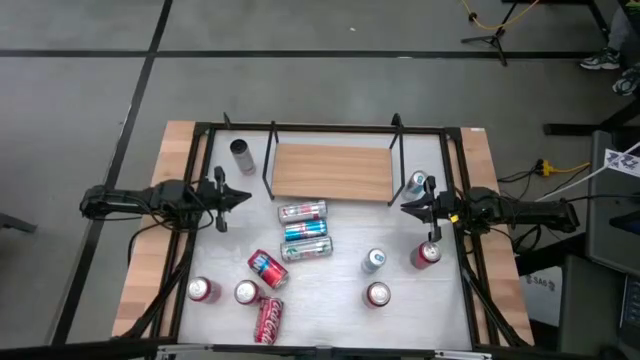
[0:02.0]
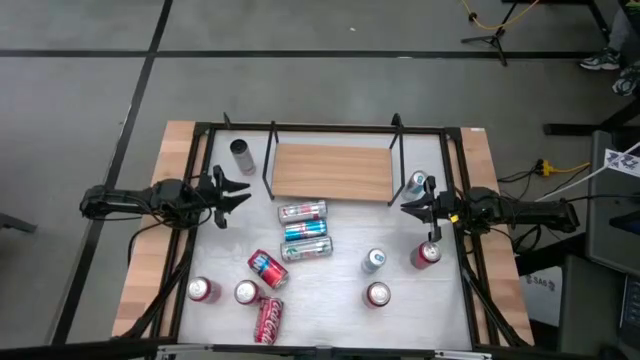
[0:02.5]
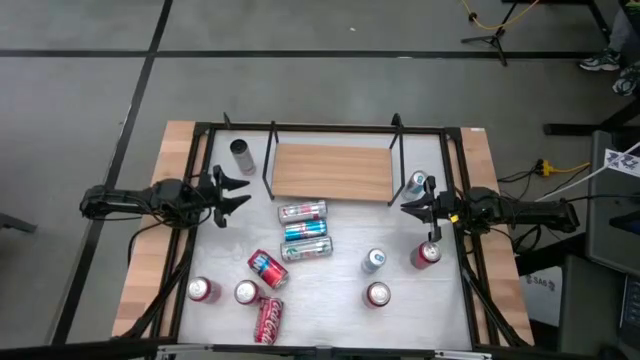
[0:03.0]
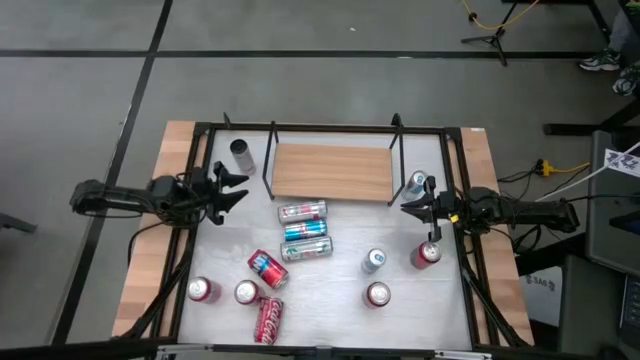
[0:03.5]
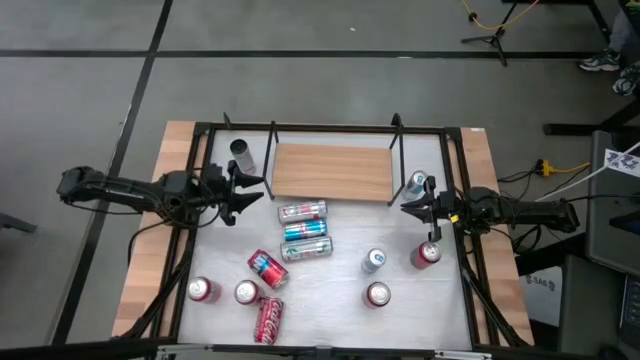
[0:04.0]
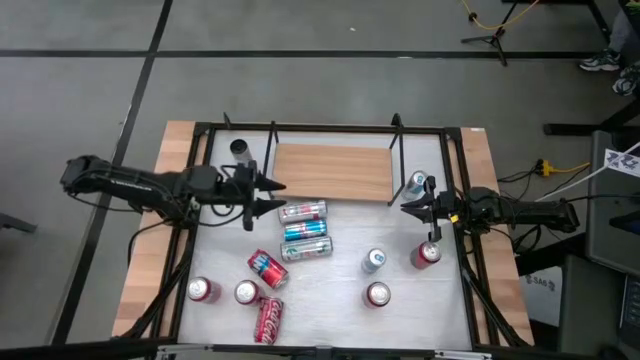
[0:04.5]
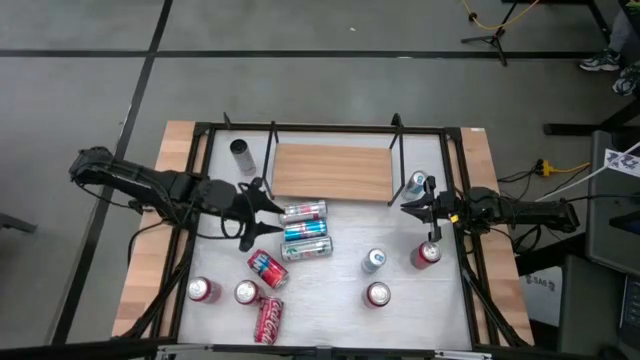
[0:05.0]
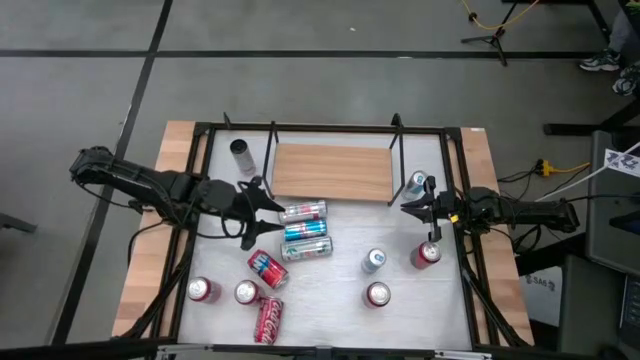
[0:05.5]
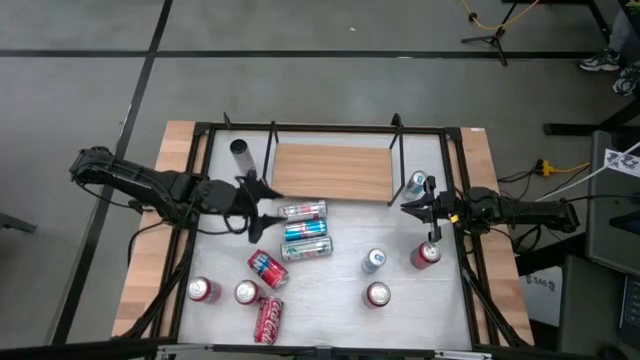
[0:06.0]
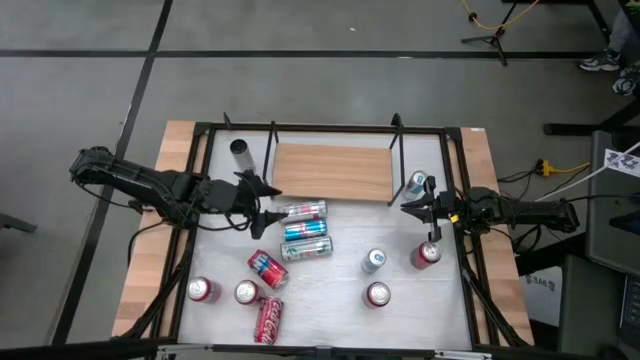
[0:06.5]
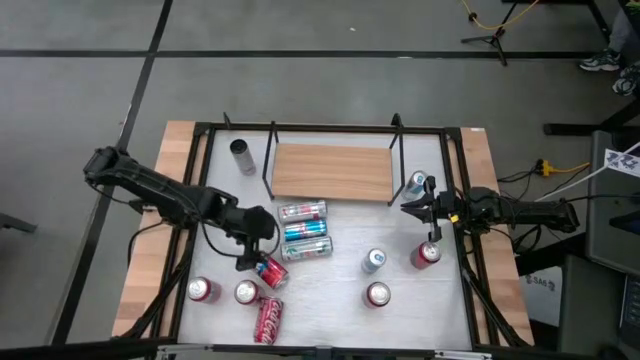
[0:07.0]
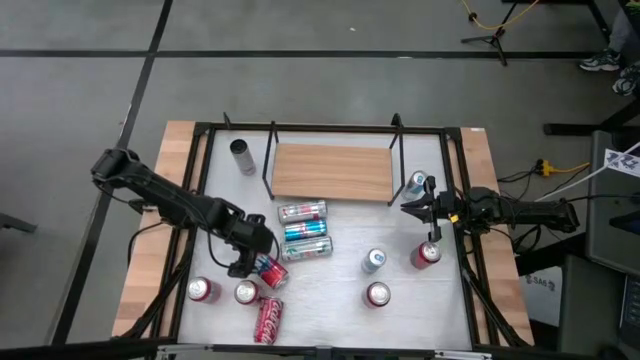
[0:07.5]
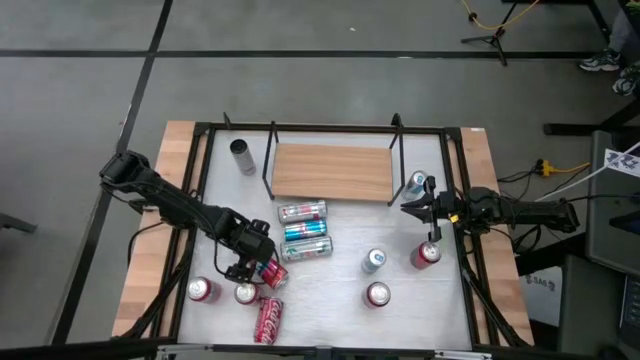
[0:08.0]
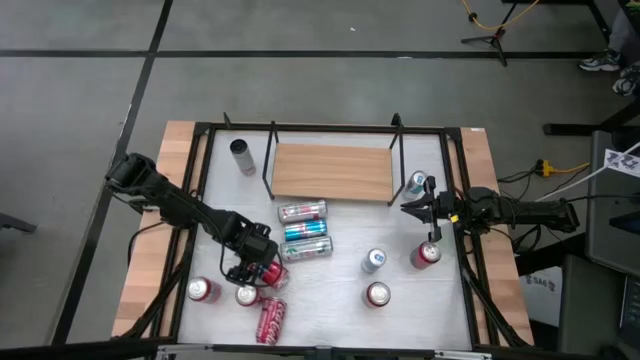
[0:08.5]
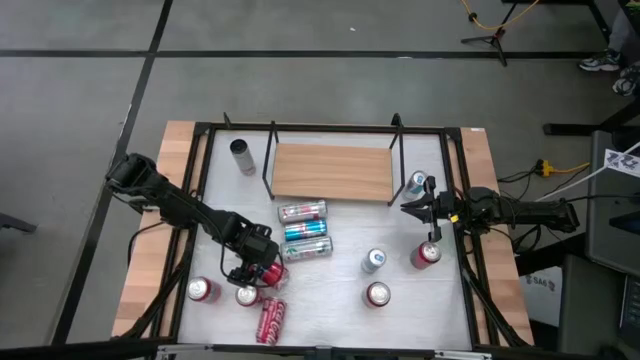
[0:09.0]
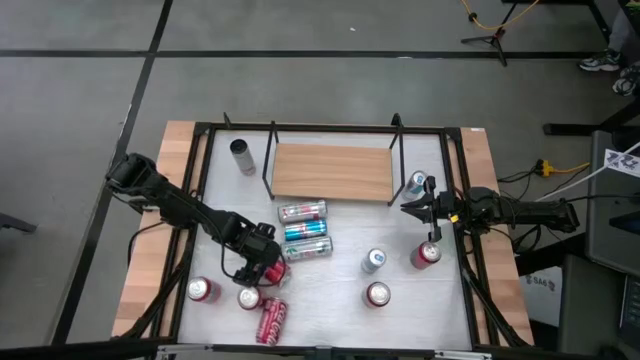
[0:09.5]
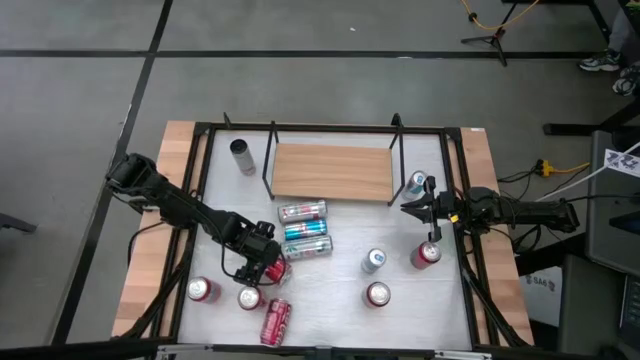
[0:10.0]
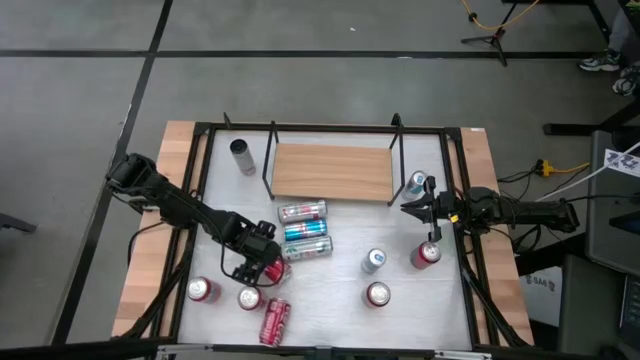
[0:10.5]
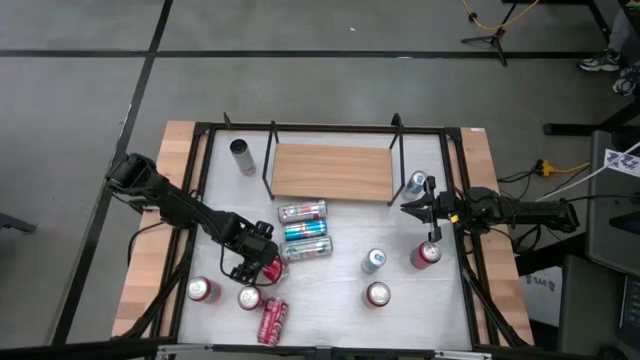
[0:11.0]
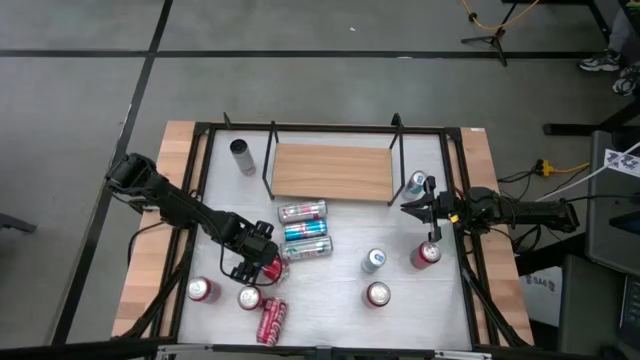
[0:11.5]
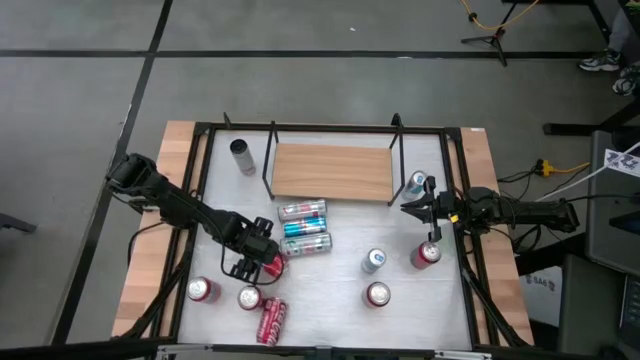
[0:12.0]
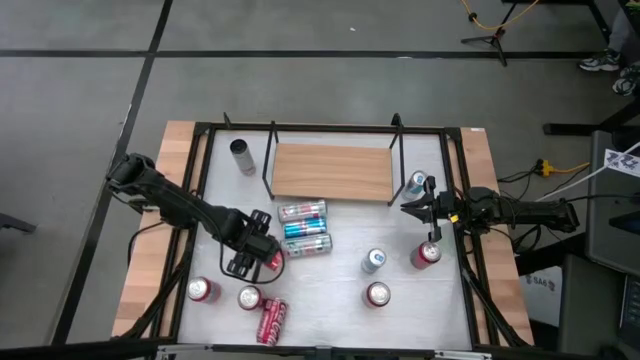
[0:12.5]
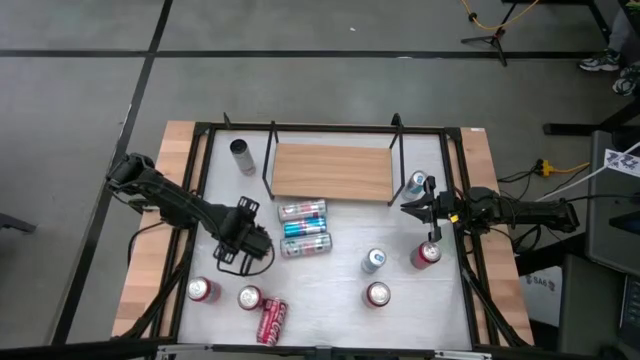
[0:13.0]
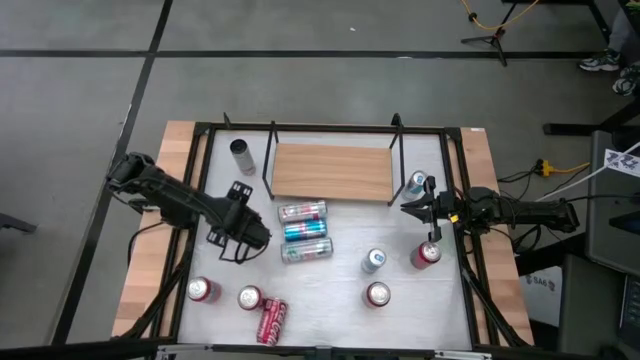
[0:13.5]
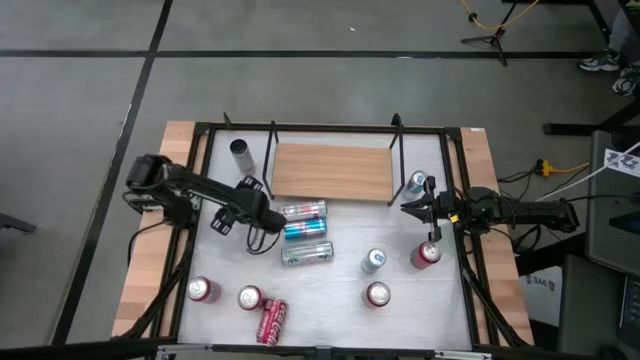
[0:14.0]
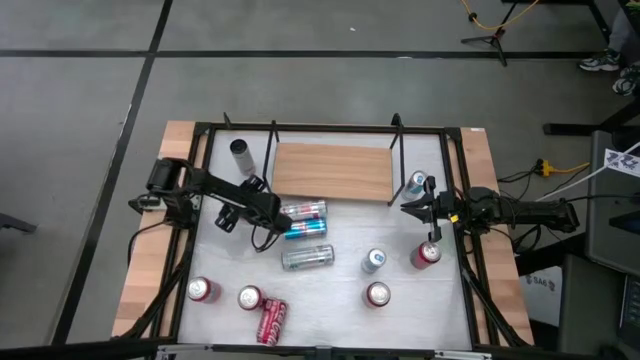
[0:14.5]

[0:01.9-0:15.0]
Task: Place canned beverage on shelf
Put the top red soda can on the shelf

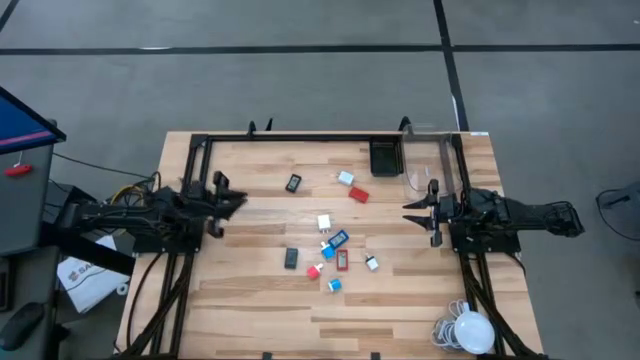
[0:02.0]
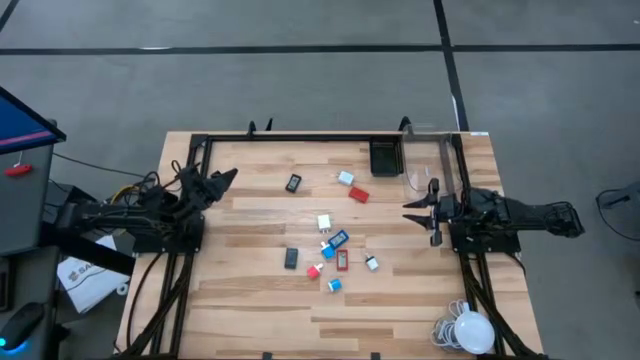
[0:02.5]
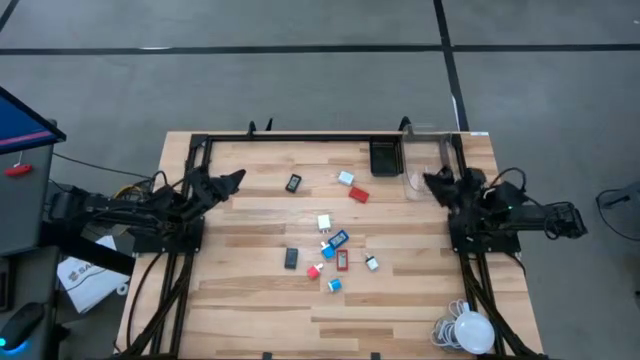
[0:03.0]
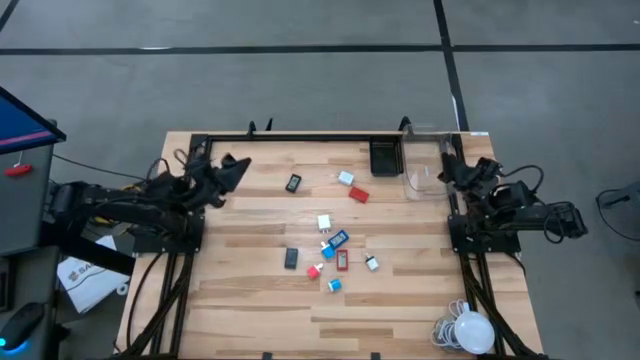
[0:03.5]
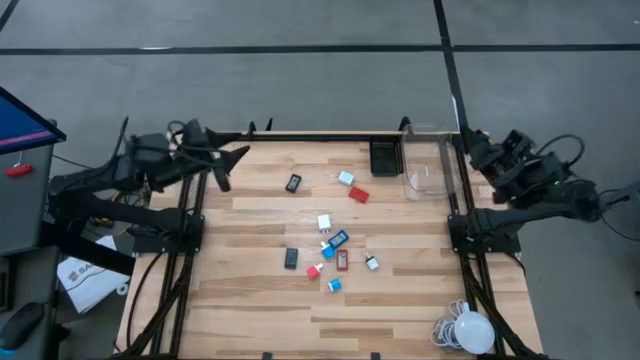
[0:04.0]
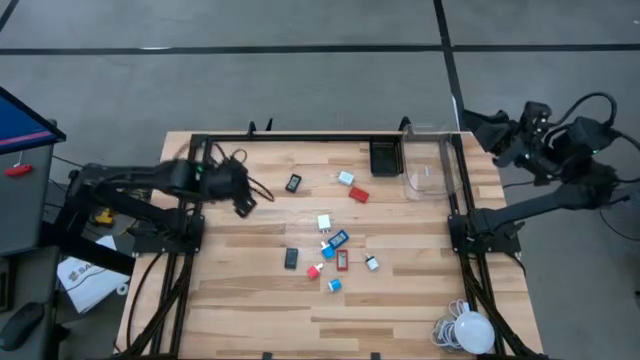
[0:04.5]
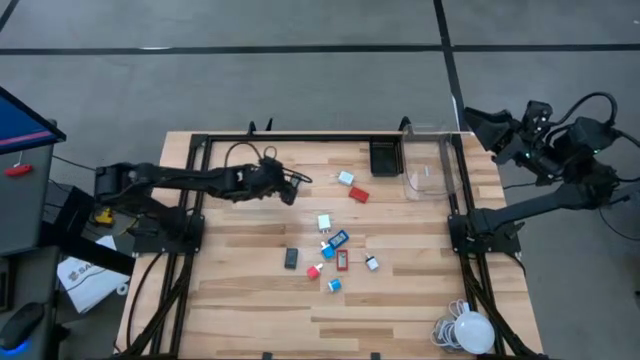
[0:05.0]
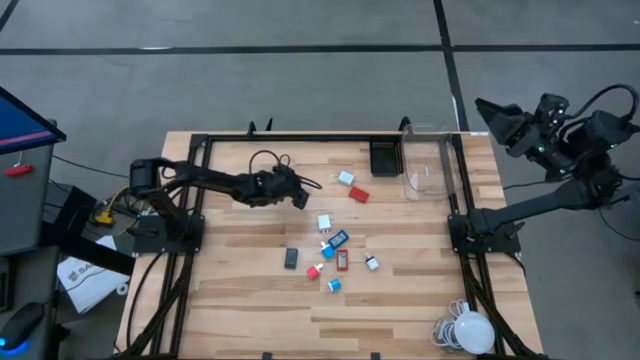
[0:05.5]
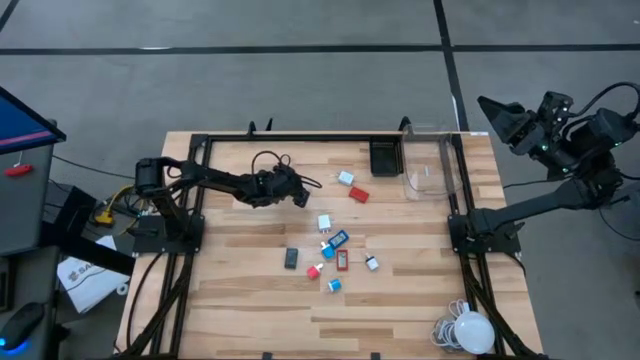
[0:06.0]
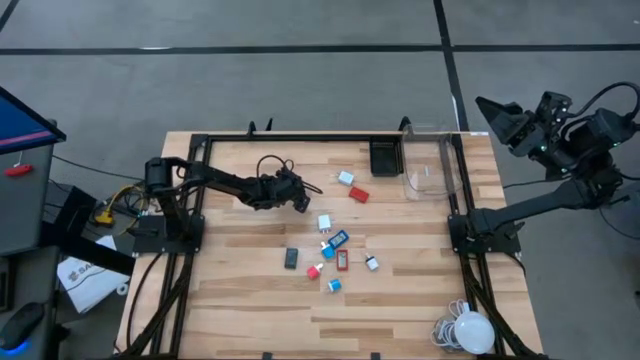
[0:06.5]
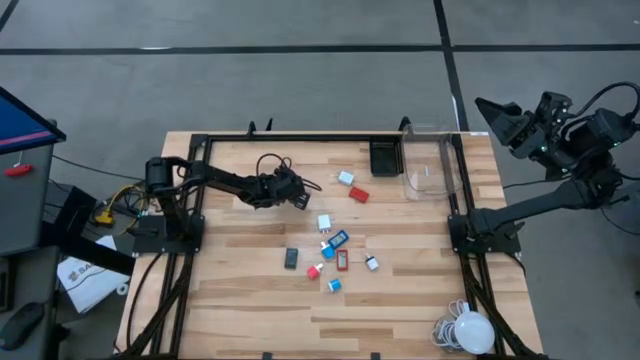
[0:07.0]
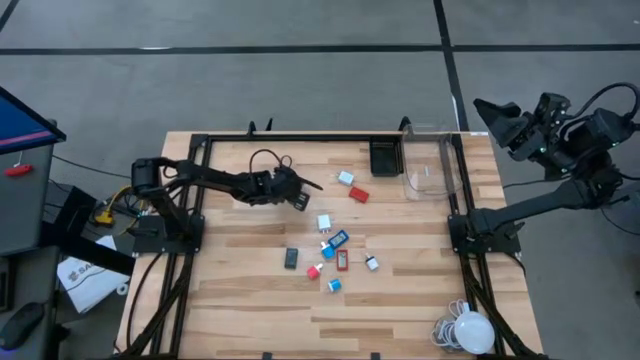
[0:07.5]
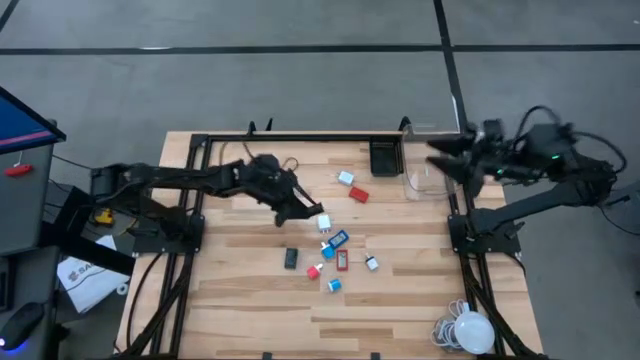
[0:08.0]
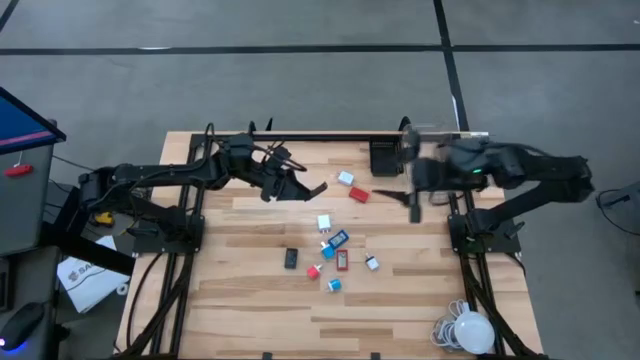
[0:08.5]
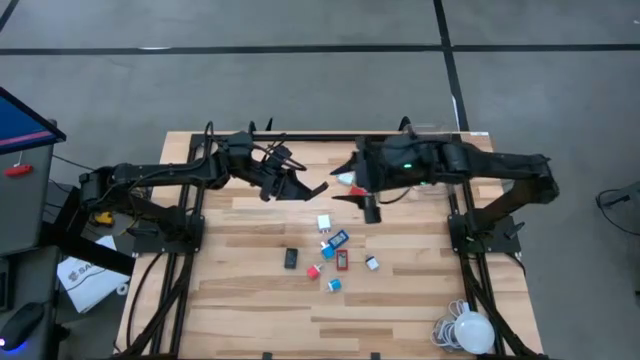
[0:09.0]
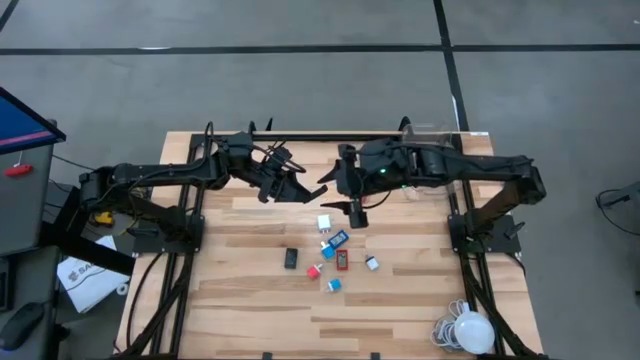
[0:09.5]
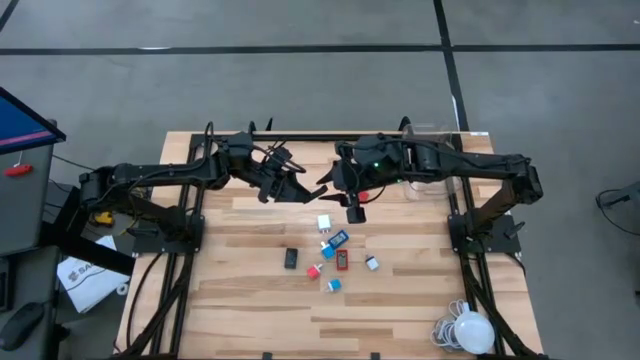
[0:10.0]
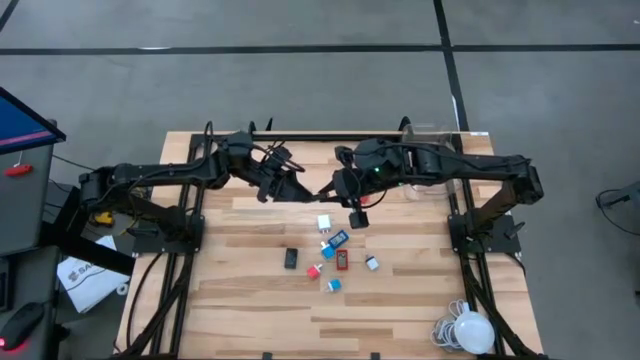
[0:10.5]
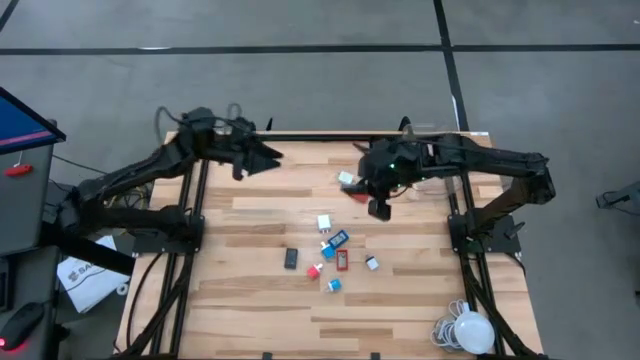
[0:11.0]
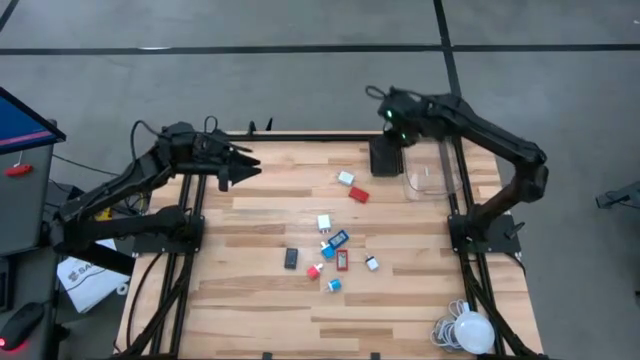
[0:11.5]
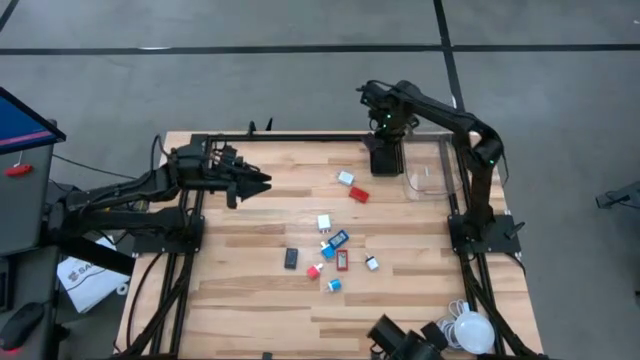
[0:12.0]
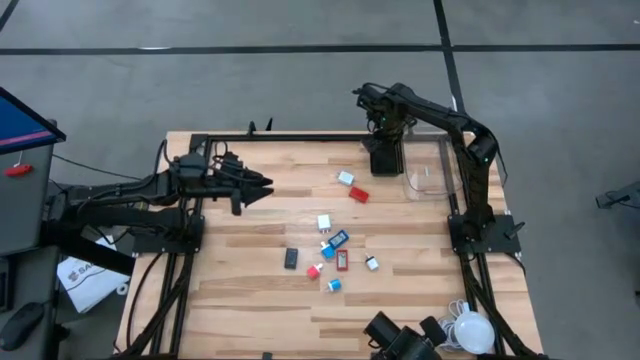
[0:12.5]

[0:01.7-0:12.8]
Task: Pick & Place Office items
Put the top black digital timer into the black bin
